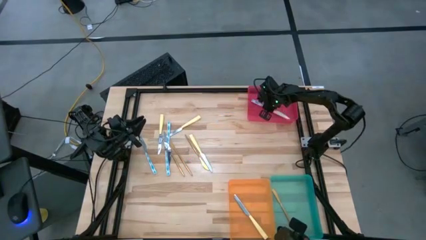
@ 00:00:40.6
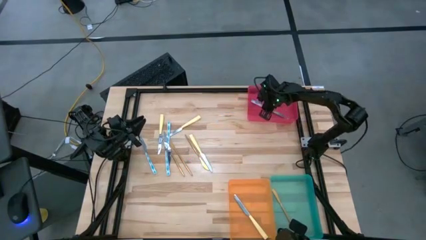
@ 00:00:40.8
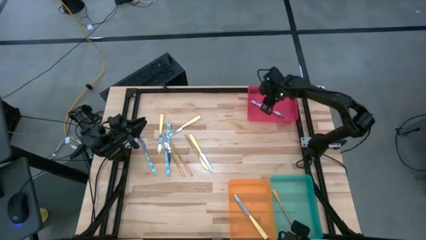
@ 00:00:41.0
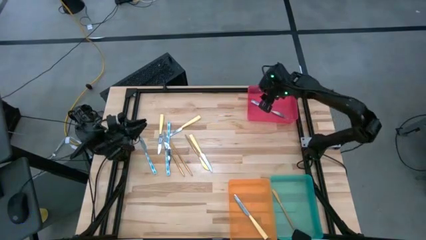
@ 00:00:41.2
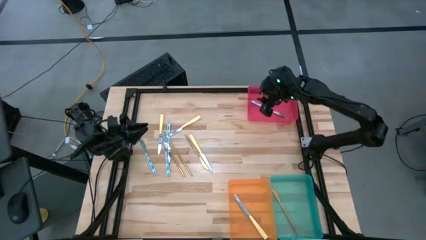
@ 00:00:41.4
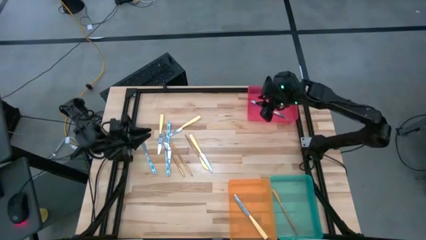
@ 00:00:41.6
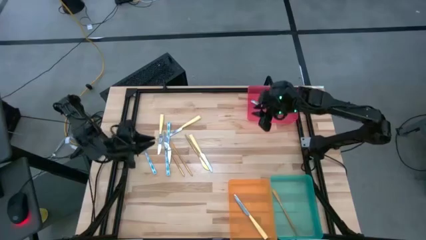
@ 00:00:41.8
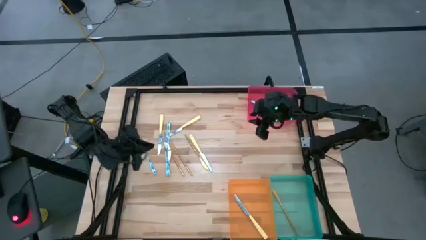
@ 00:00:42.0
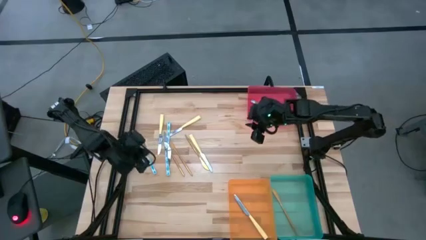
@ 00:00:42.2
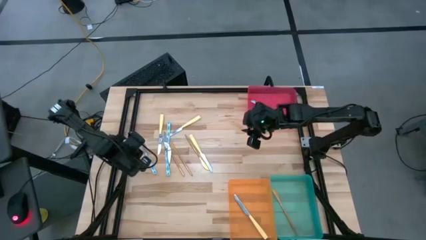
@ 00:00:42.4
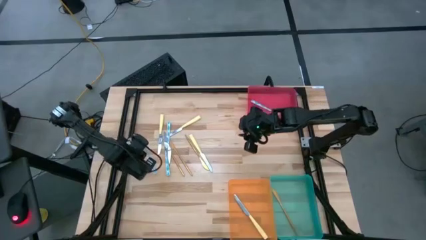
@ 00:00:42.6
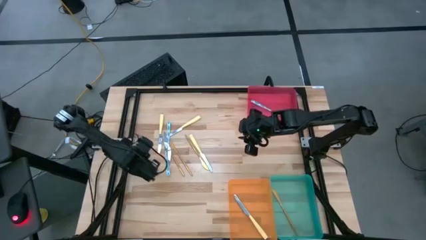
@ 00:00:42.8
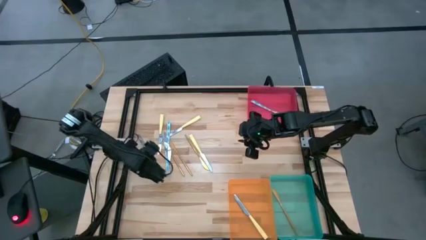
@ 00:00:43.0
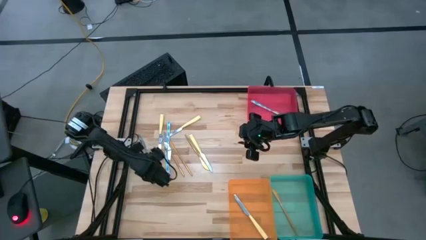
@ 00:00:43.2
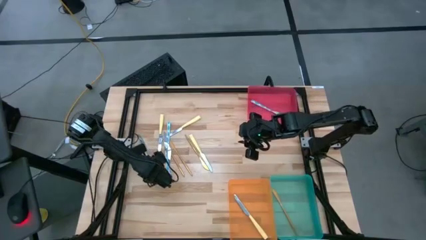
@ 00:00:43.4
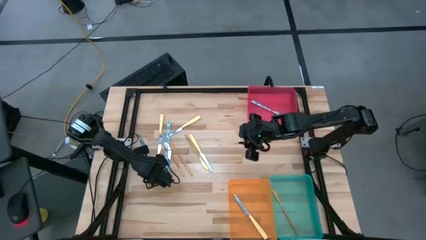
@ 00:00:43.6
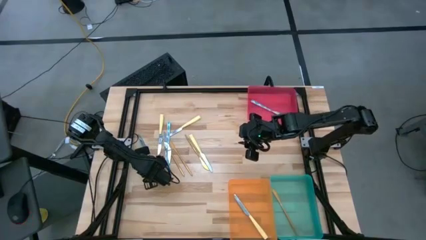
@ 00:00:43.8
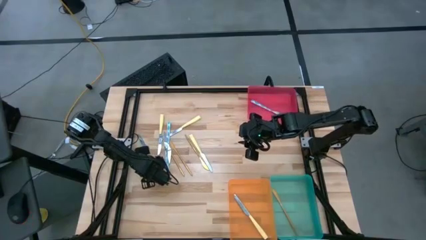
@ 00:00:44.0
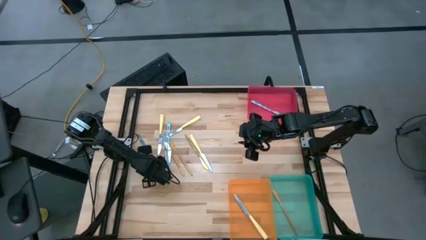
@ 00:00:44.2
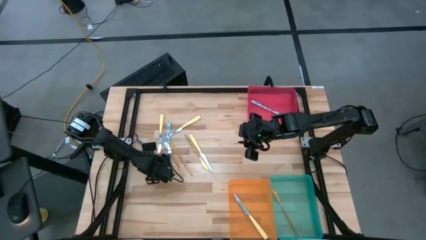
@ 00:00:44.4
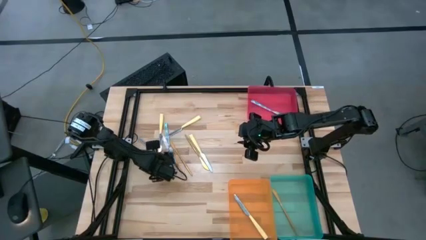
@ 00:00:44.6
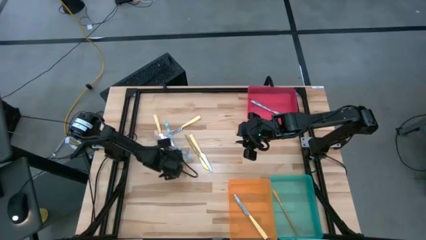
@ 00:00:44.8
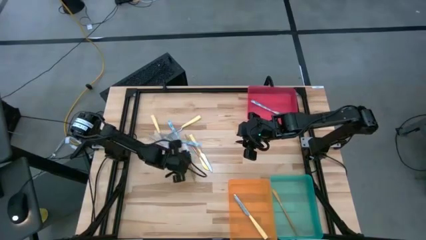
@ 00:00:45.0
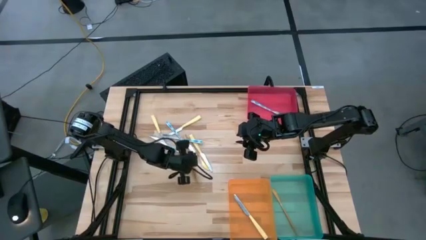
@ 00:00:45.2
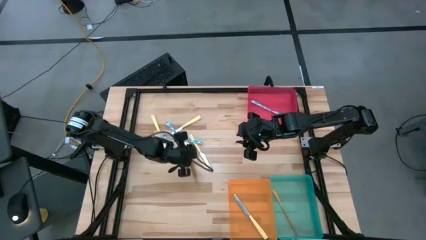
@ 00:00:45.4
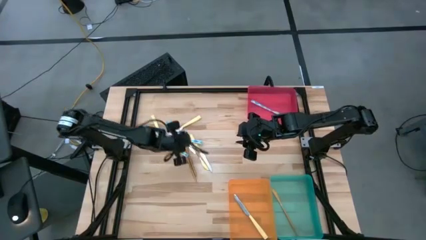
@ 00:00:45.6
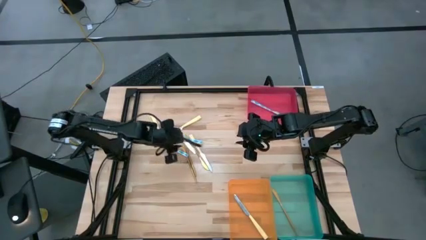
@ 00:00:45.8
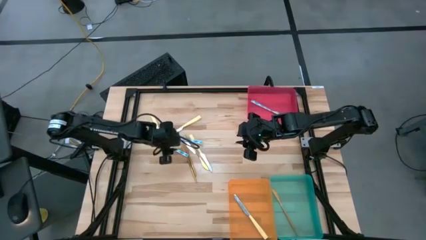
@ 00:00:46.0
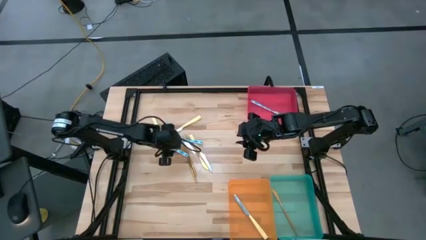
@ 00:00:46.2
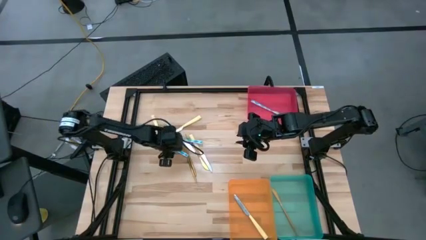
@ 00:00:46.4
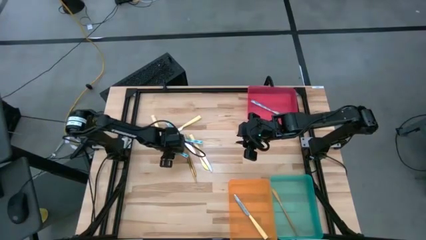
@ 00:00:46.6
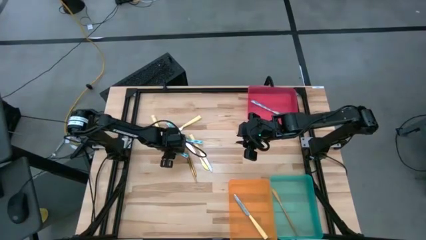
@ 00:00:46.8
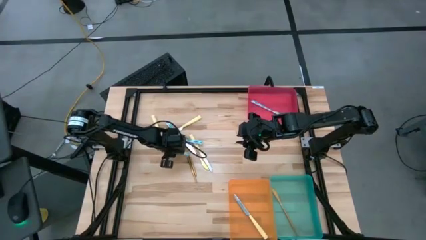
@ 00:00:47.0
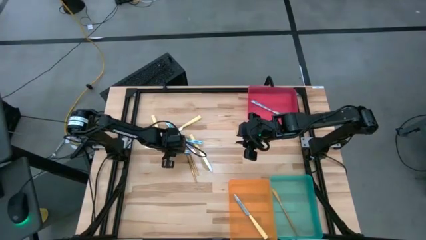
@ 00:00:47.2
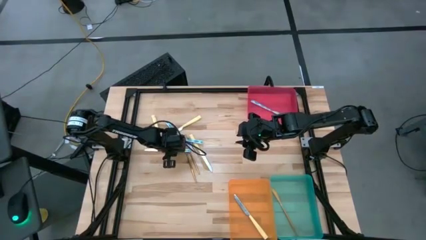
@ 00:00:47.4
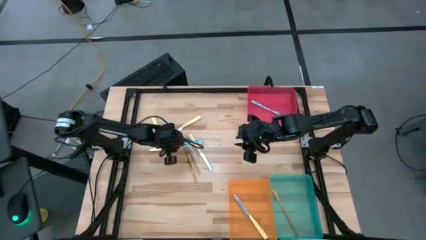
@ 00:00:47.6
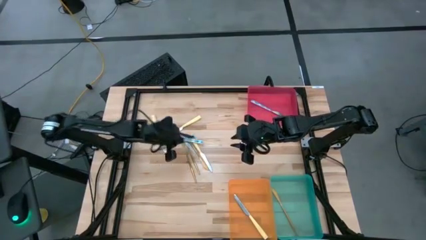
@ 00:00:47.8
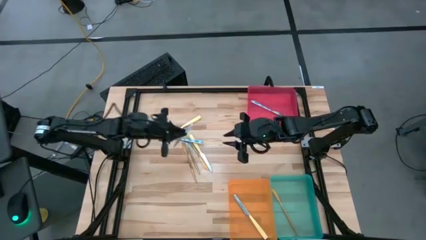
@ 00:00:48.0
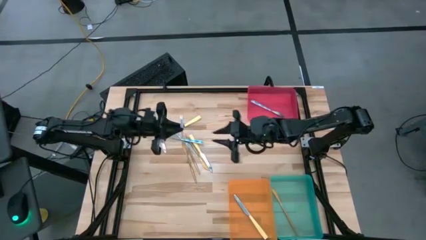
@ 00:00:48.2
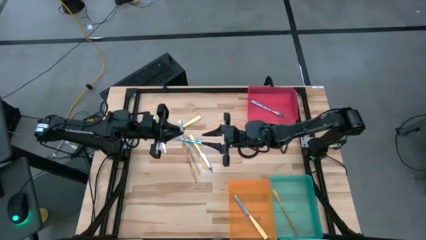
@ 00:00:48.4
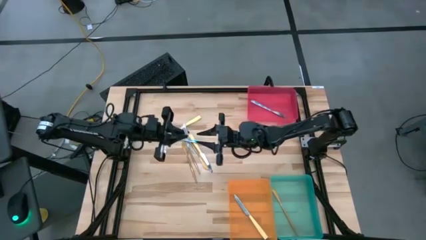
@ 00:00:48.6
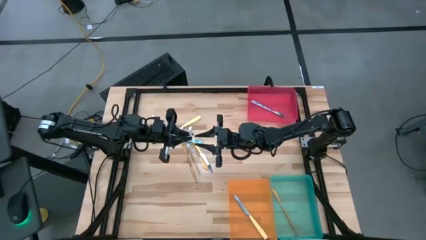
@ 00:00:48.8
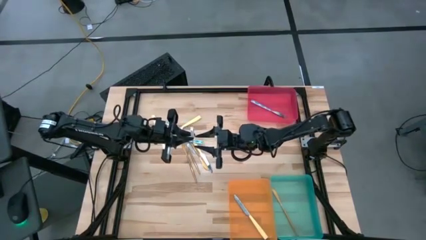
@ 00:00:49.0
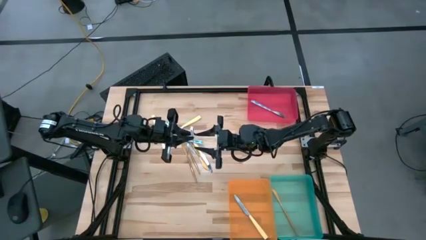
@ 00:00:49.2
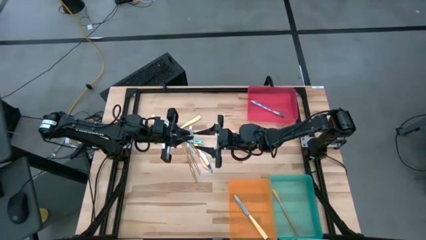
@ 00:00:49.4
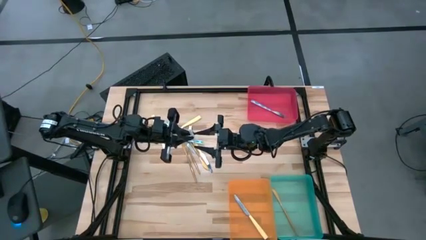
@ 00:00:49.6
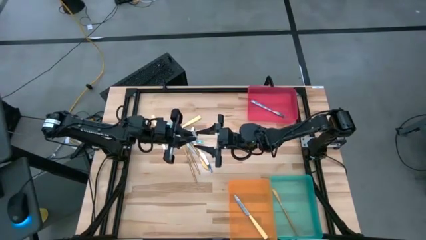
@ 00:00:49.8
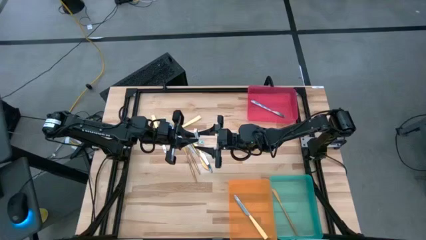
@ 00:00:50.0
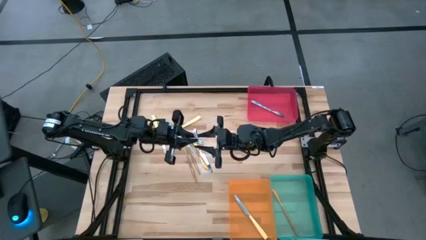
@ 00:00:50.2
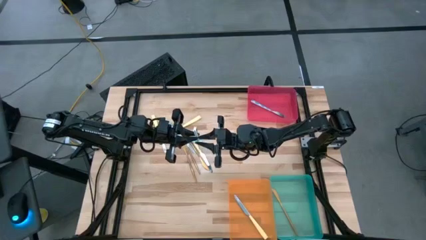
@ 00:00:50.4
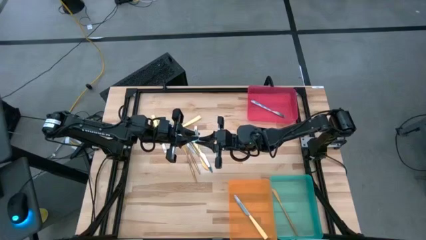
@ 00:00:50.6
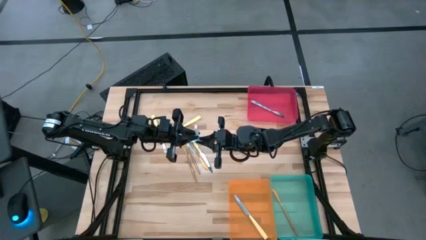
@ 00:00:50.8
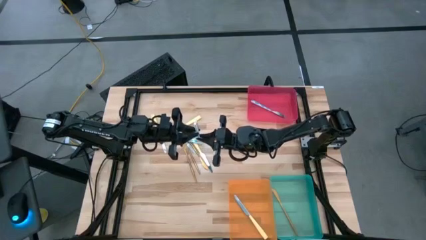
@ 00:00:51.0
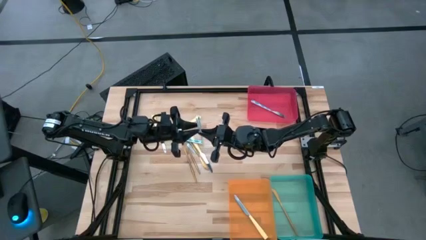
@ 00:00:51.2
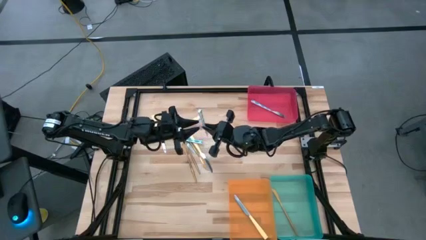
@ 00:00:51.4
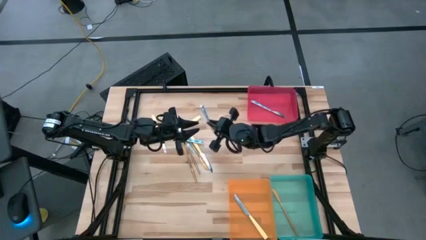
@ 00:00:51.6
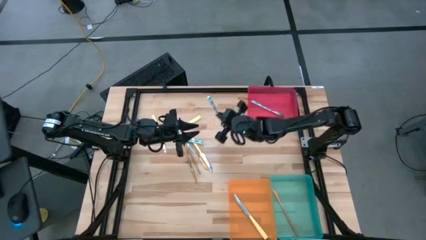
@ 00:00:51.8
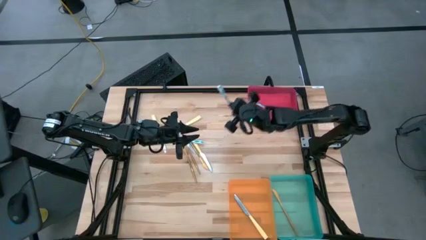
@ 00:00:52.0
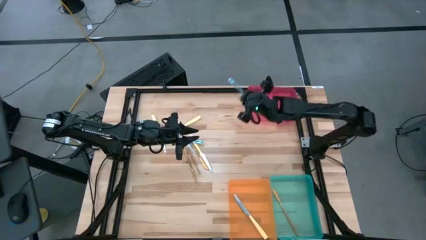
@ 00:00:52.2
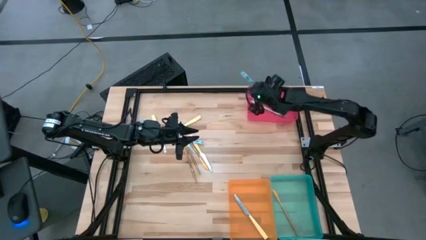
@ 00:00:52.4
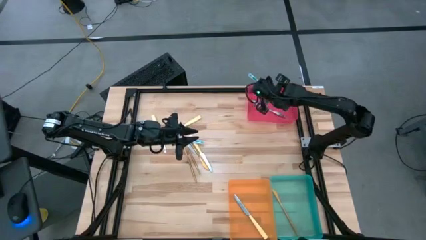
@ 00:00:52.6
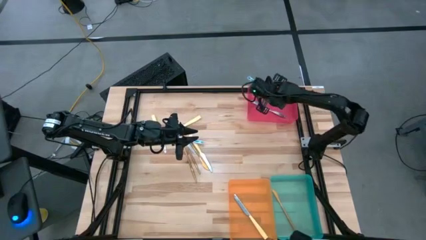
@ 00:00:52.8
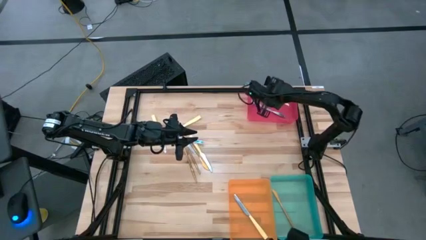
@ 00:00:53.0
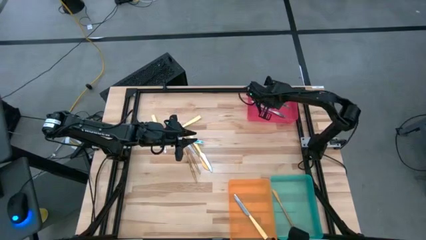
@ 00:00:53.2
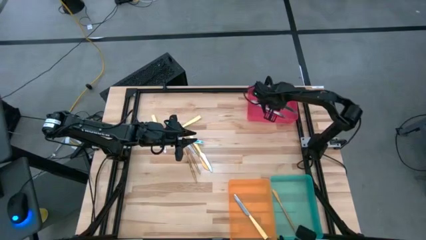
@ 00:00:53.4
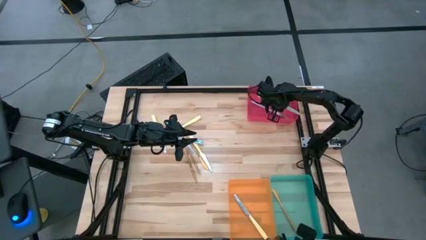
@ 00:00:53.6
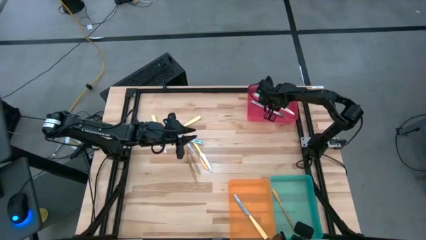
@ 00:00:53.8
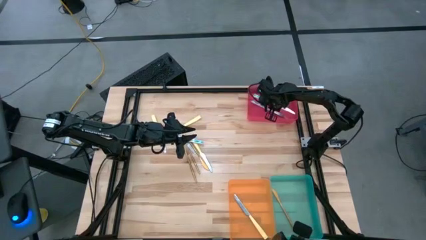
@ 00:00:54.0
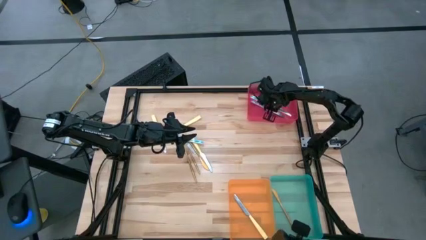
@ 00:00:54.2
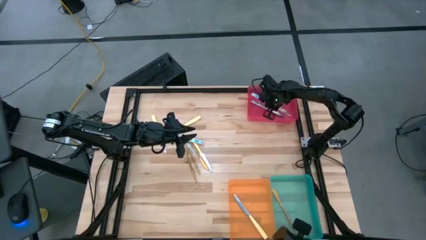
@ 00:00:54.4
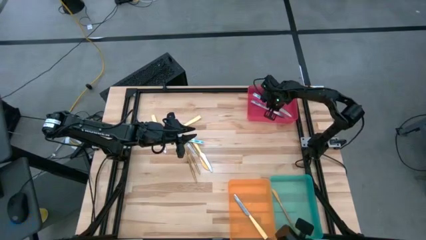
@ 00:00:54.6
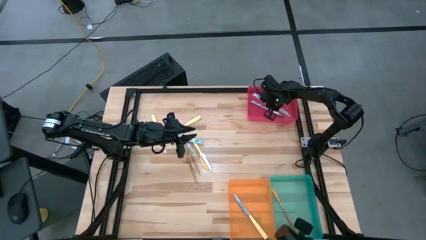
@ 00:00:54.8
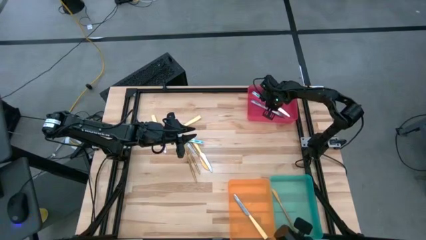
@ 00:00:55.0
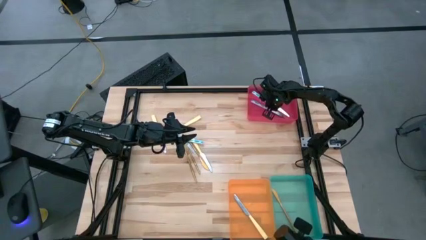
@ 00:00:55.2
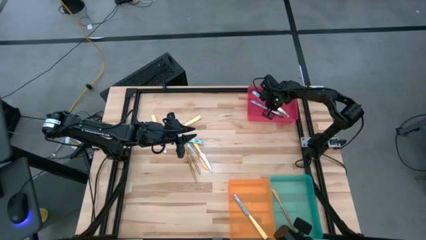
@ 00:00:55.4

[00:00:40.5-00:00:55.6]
Task: Sort silverware by color (type)
Put the blue patterned knife into the red bin
